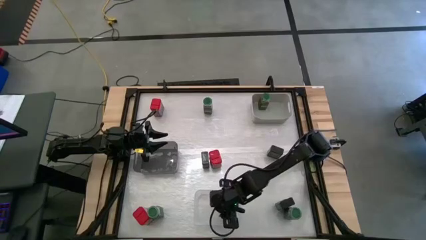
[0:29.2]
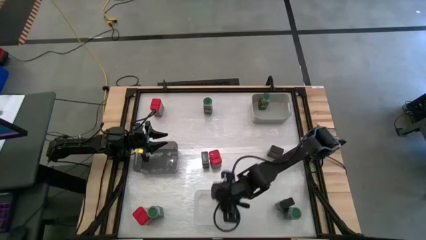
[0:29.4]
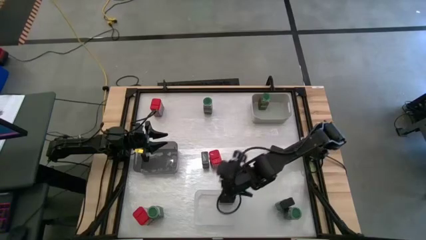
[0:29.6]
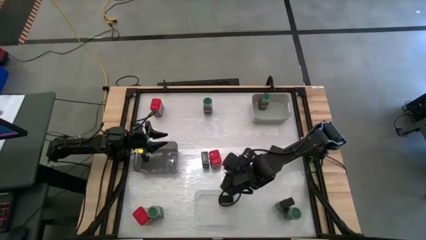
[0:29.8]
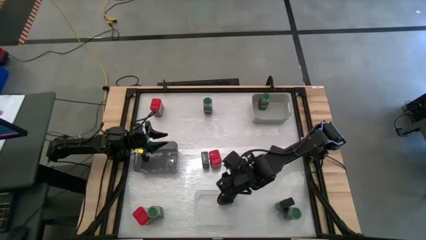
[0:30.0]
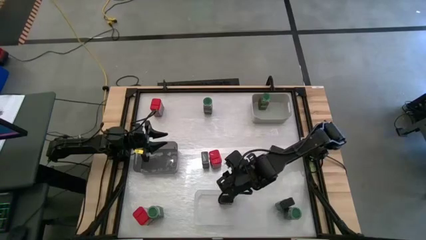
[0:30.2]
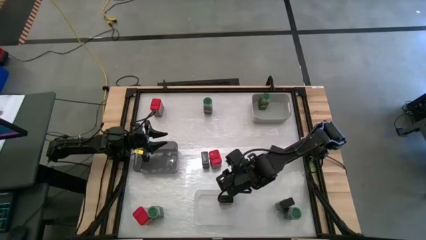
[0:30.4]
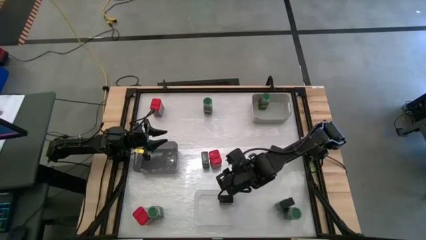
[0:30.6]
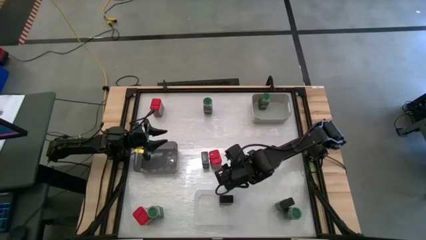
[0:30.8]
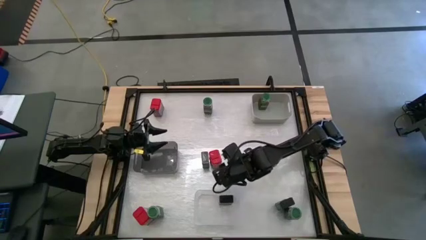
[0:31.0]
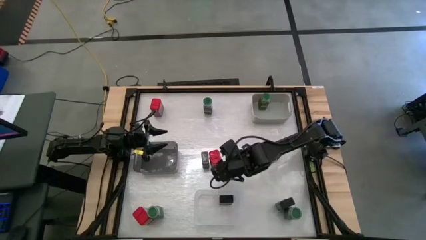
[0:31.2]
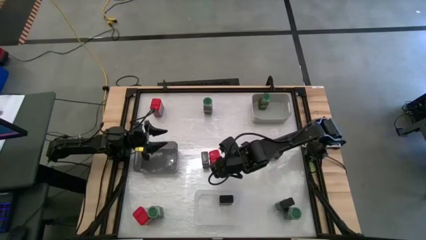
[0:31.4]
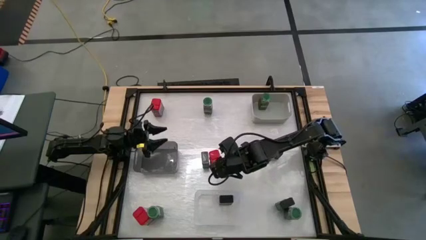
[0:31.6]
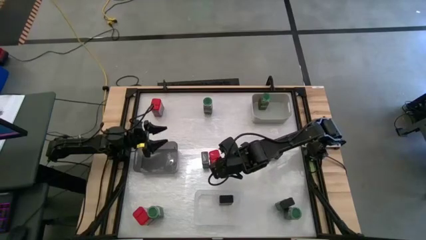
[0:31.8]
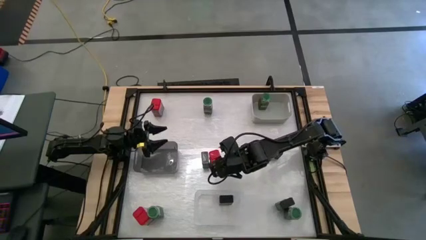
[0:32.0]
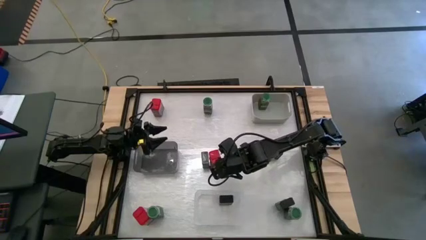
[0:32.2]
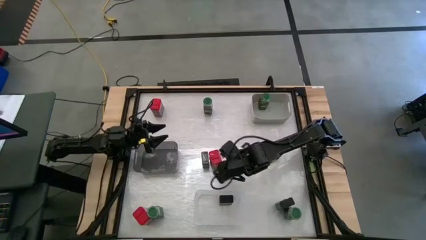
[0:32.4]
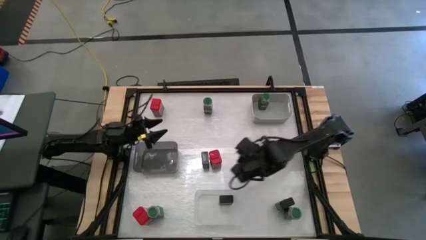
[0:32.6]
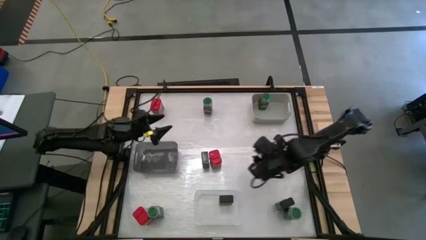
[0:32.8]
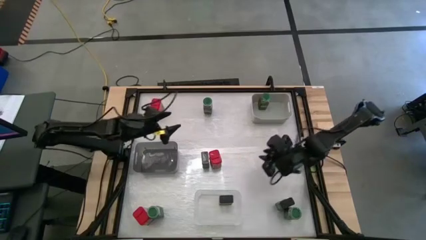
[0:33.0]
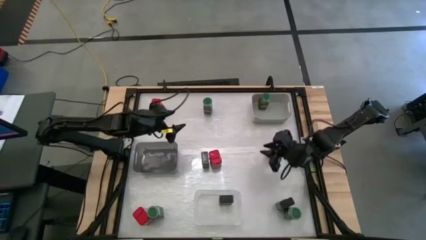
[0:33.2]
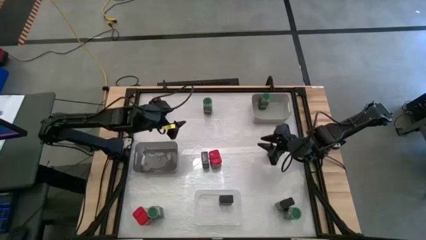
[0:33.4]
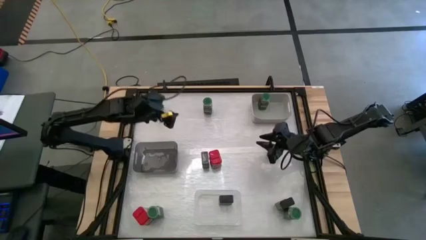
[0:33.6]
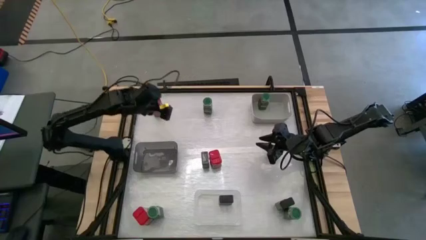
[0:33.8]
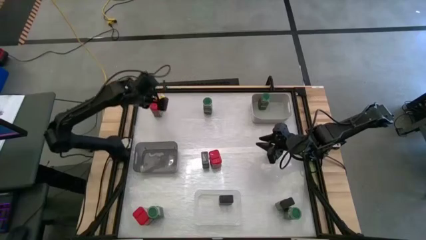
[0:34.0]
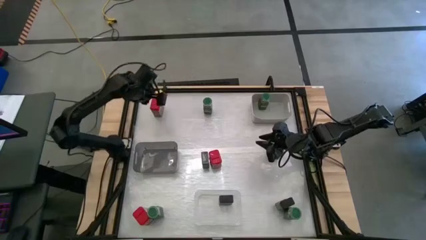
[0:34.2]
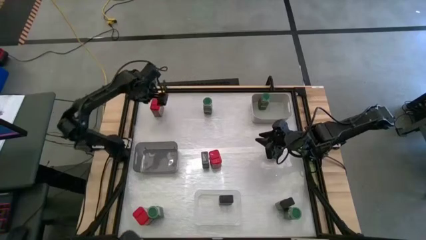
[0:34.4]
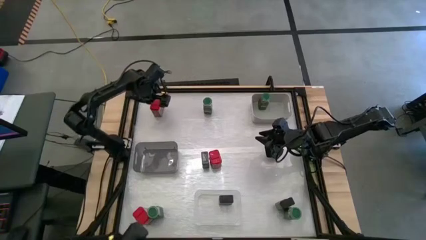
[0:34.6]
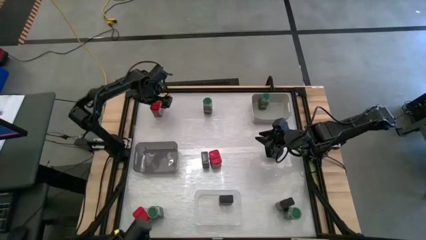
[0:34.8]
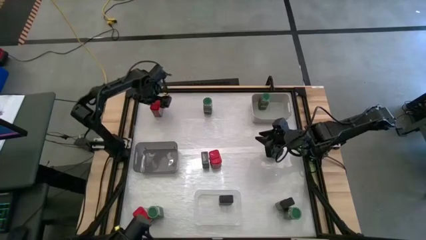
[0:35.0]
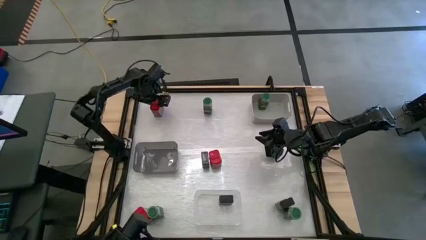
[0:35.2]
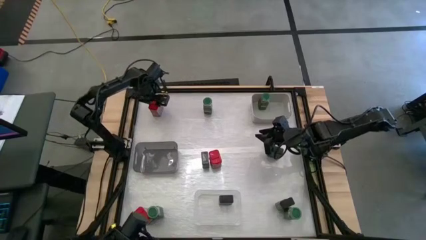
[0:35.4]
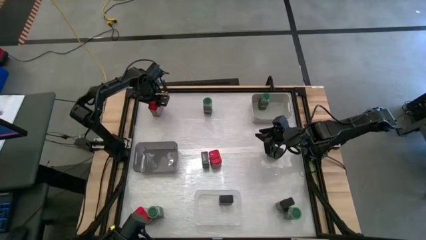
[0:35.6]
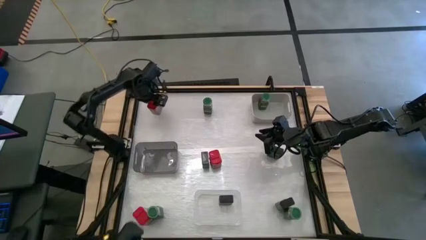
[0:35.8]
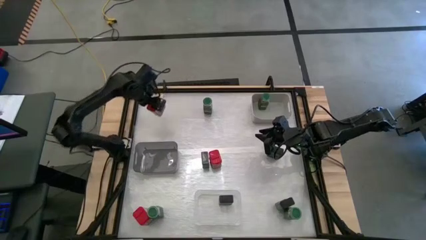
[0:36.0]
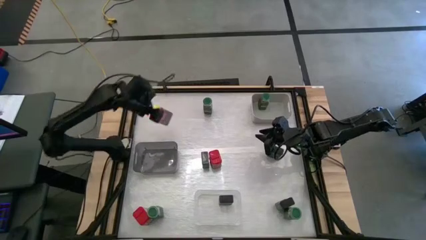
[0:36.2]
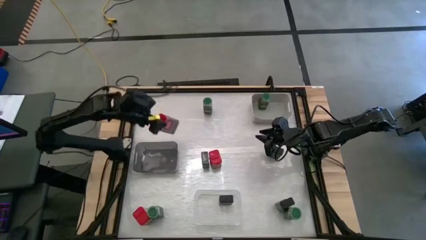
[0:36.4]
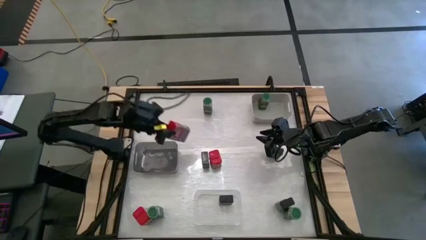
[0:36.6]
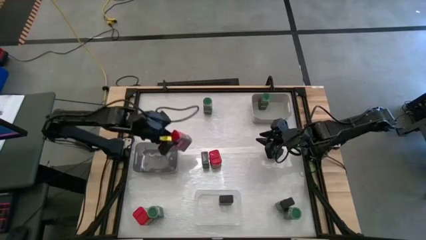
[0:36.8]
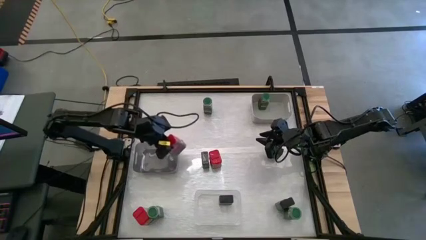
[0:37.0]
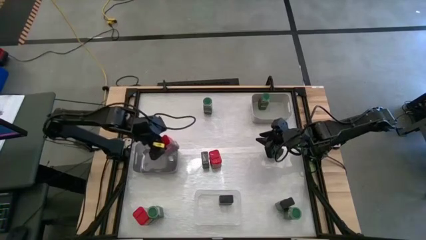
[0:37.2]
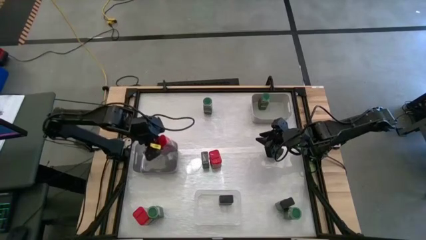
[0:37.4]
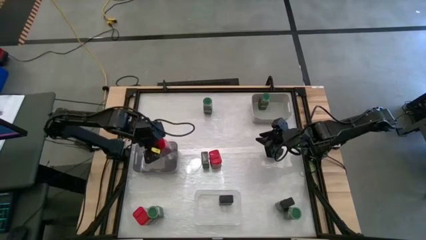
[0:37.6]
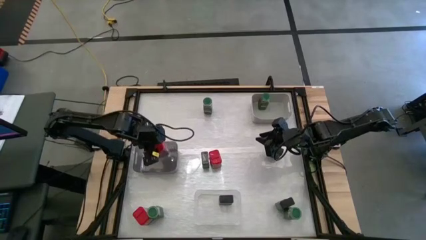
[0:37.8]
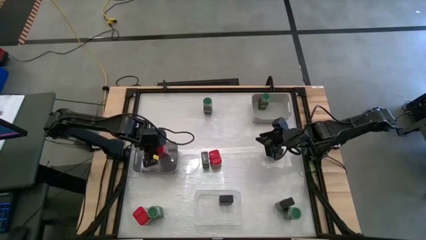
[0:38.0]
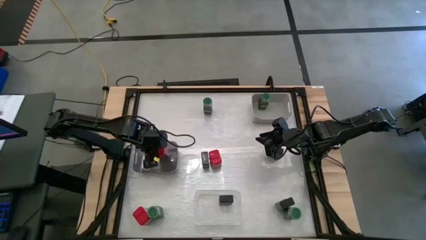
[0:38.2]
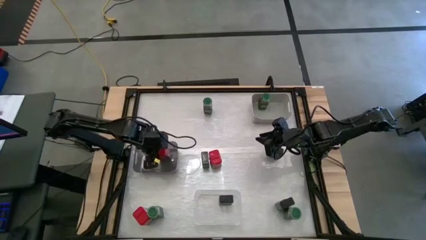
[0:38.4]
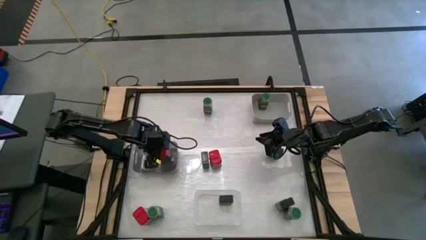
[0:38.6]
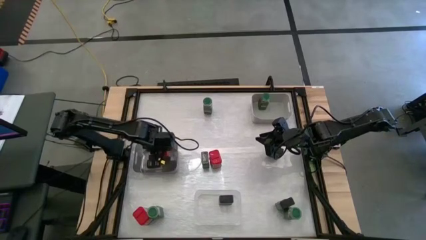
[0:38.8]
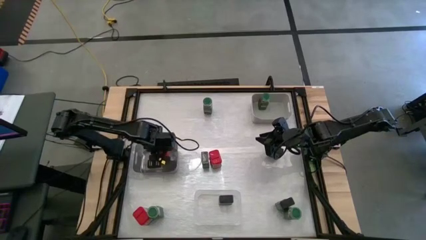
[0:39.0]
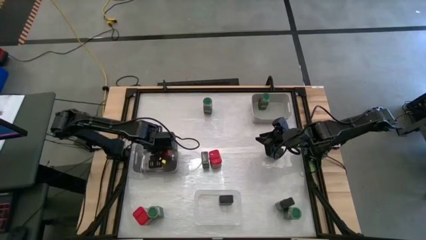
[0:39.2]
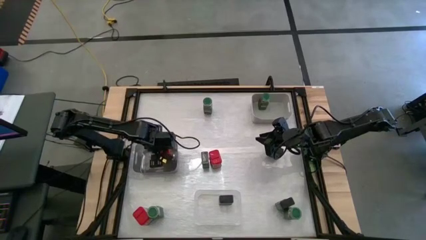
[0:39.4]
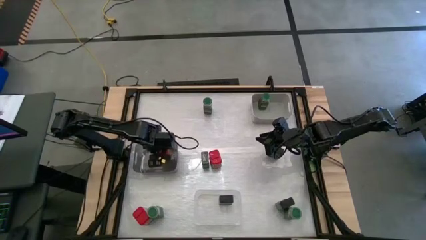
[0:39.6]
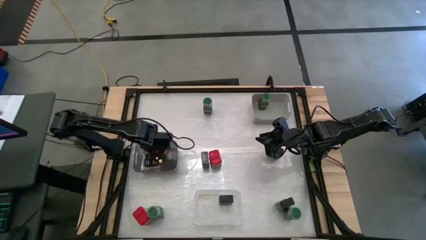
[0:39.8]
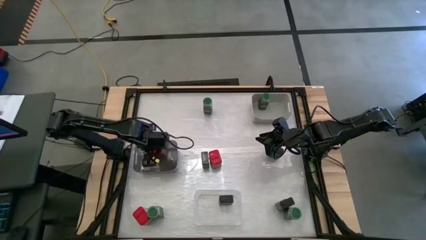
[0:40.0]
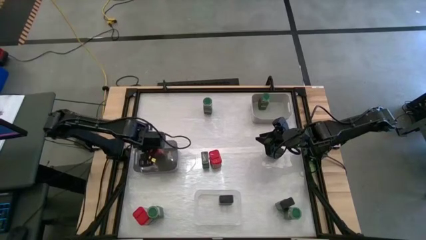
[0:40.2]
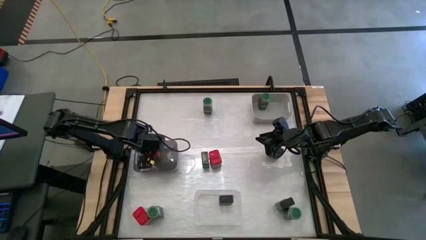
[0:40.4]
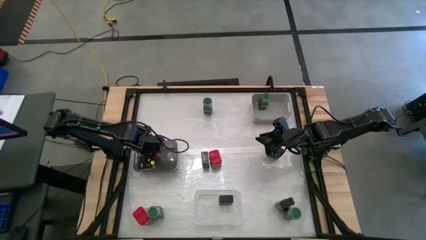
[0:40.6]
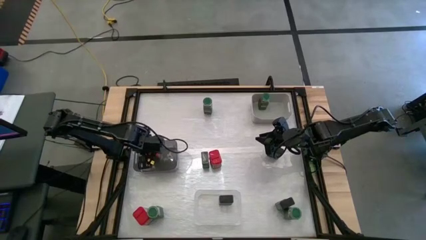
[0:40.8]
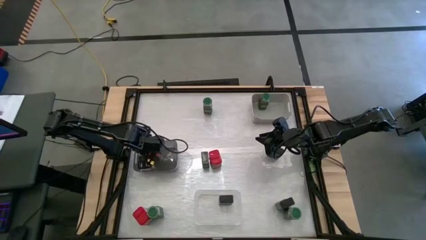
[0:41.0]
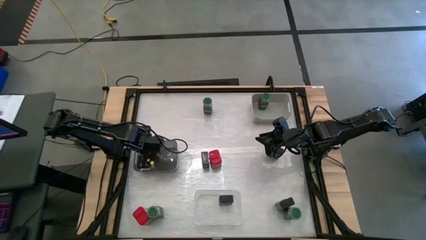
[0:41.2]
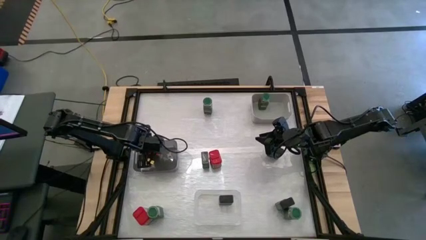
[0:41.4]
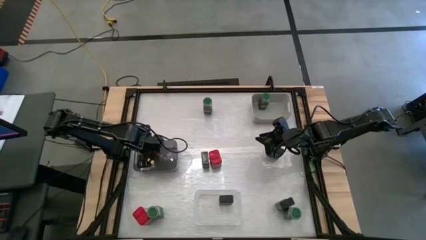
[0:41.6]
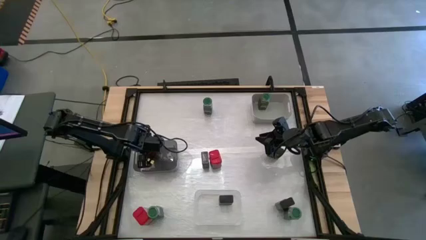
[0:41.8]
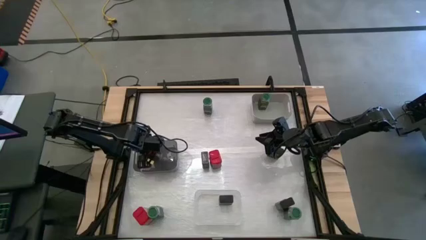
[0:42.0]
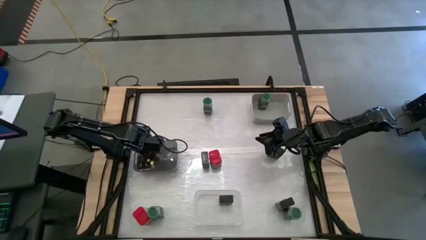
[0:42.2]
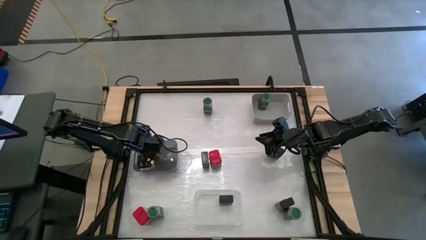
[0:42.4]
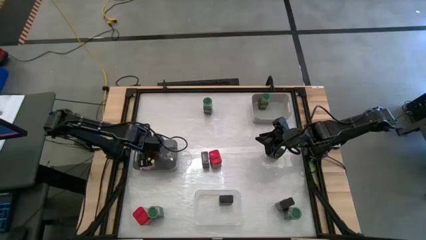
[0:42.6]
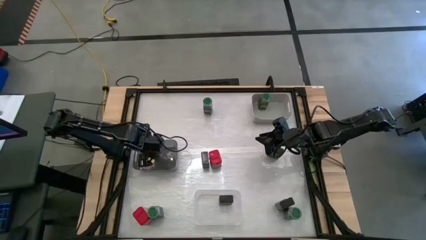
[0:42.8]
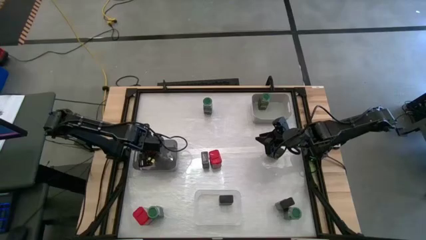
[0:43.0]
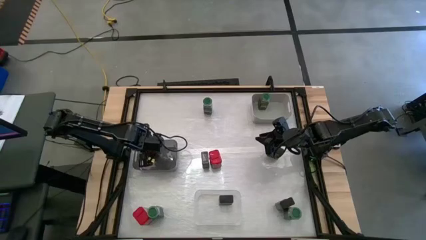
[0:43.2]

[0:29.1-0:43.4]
Task: Sort spices by type
Put the top left red seasoning can into the black bin

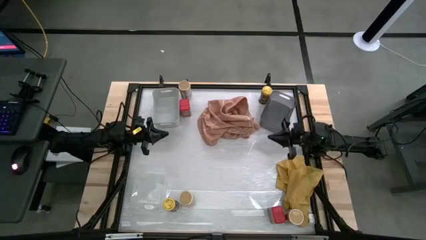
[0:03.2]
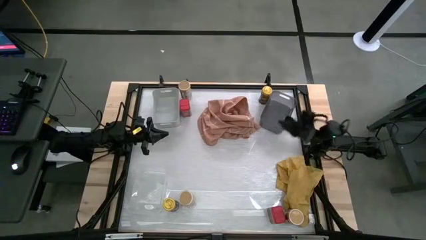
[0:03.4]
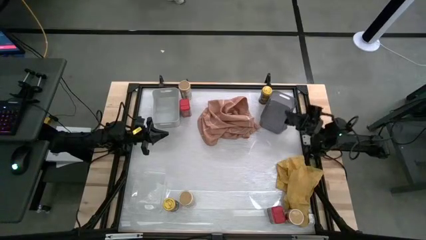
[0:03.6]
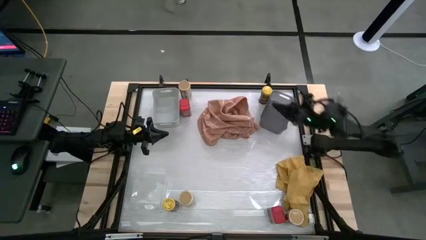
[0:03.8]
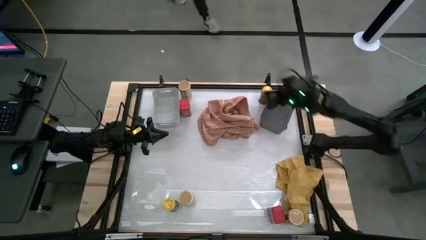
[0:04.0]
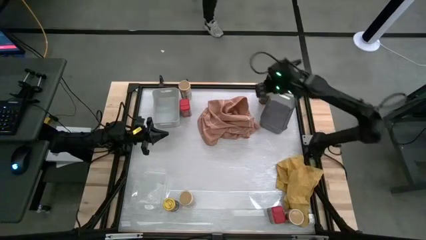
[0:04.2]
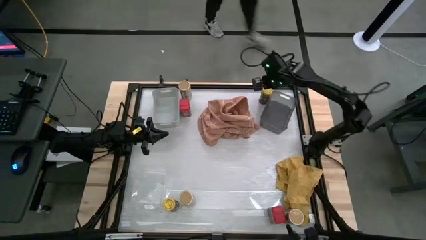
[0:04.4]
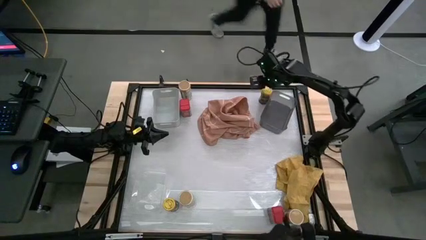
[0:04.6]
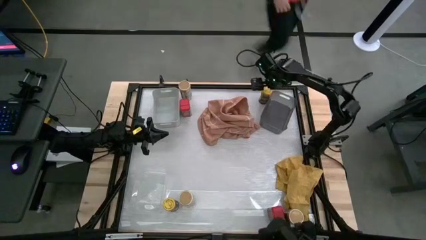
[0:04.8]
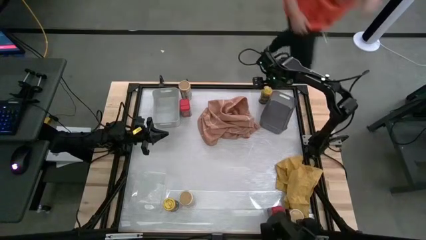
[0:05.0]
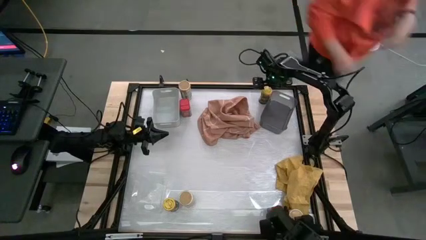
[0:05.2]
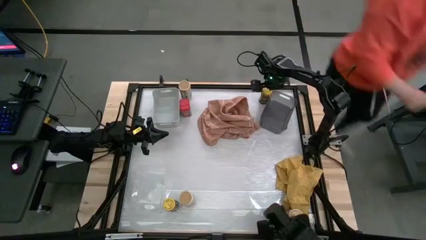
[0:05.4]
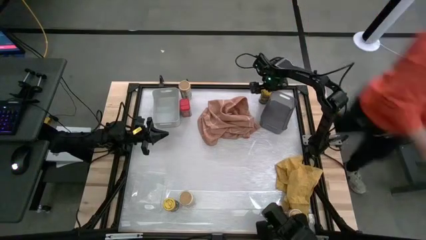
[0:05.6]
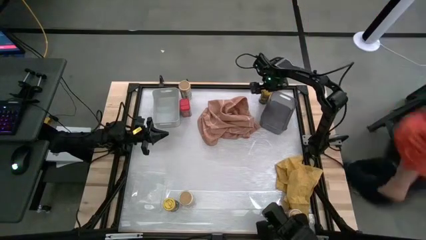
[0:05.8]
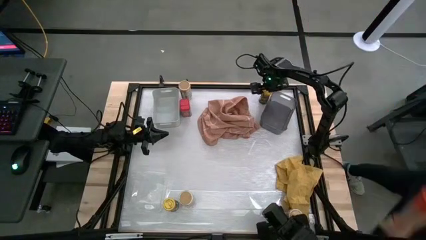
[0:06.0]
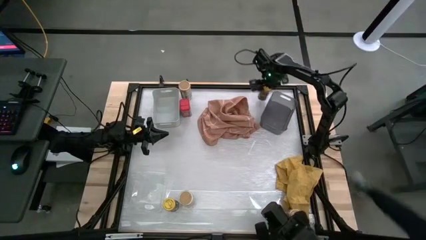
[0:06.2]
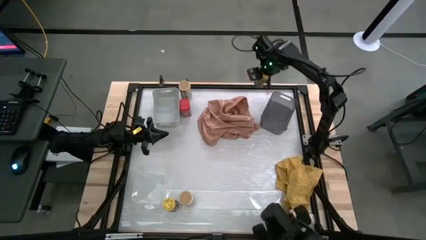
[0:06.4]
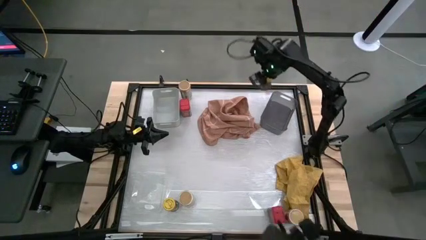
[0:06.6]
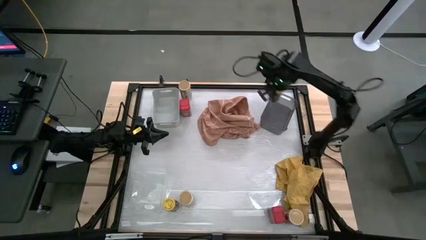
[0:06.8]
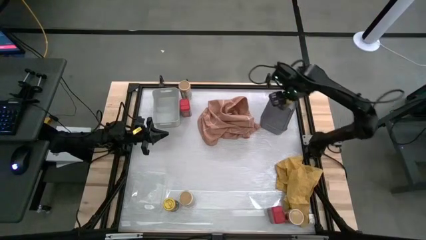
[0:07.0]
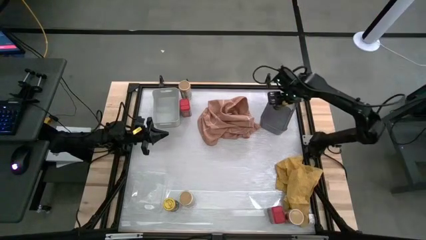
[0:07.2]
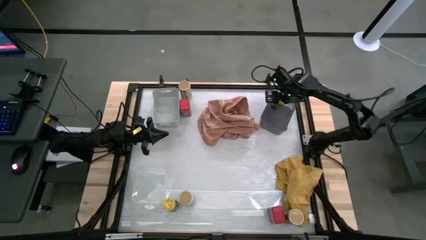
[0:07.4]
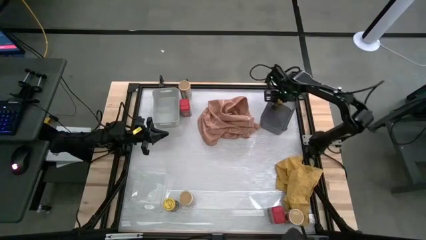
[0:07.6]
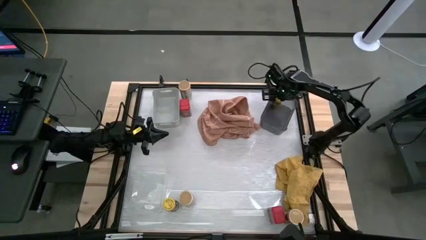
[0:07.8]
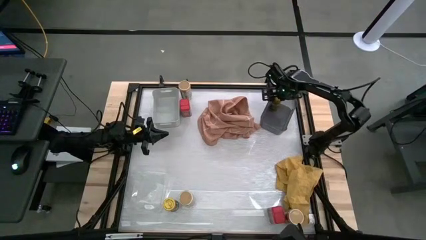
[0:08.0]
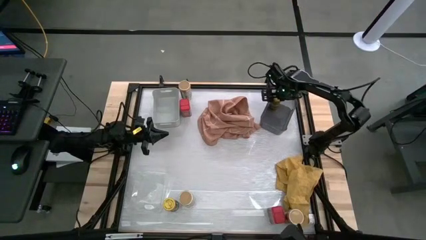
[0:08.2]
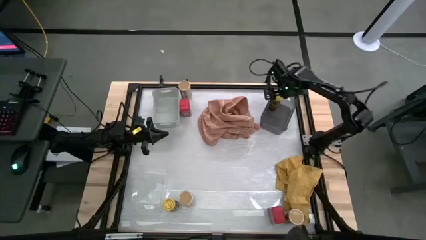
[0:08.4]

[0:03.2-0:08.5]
Task: Sort spices by type
Put the top yellow seasoning bottle into the black bin
